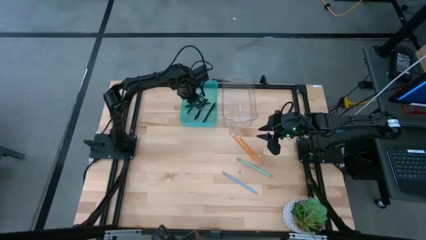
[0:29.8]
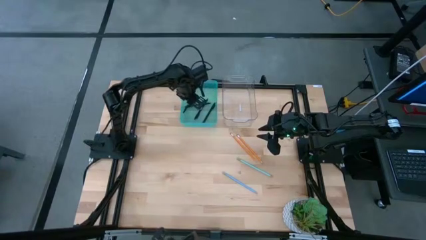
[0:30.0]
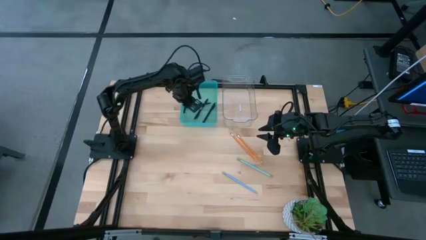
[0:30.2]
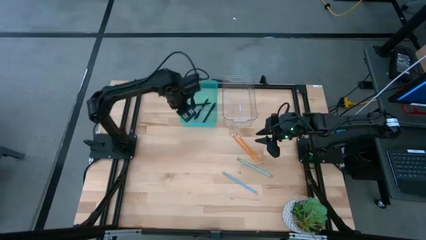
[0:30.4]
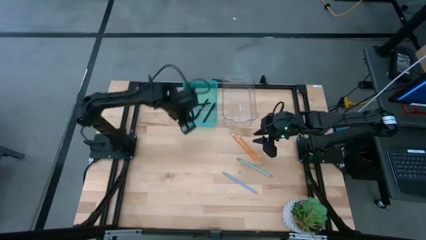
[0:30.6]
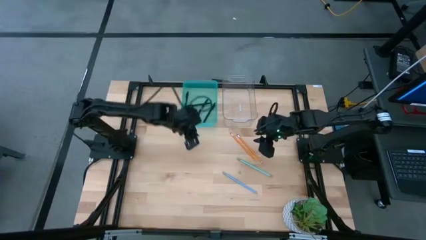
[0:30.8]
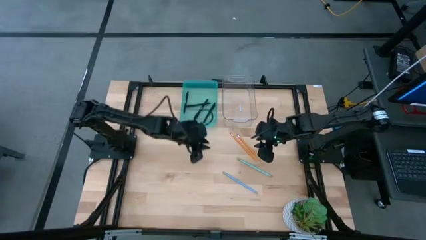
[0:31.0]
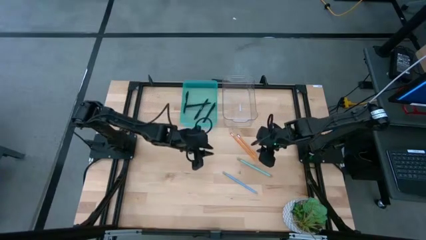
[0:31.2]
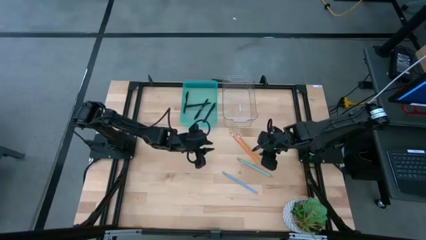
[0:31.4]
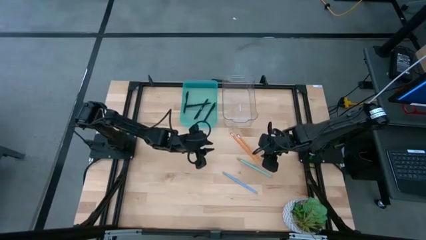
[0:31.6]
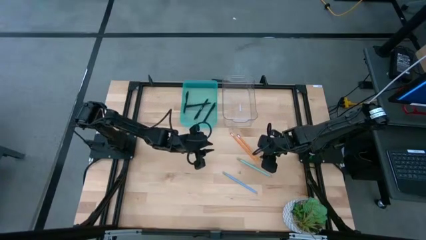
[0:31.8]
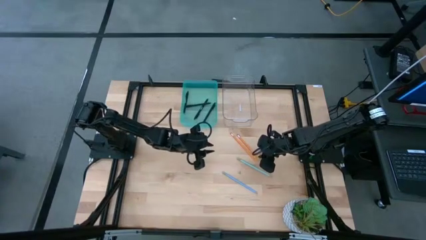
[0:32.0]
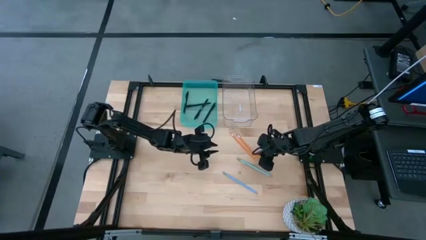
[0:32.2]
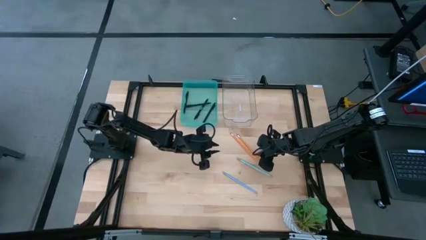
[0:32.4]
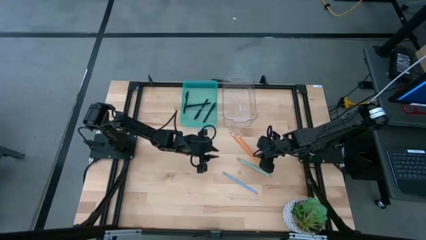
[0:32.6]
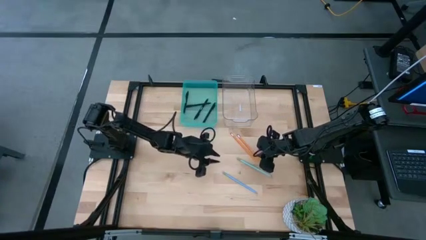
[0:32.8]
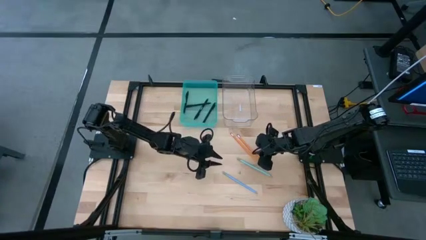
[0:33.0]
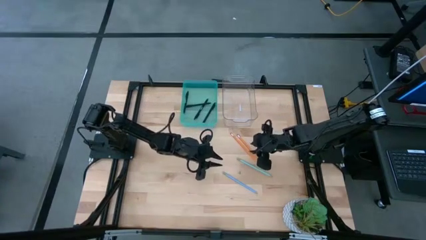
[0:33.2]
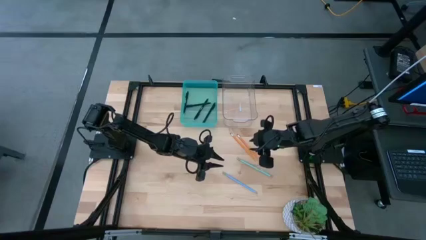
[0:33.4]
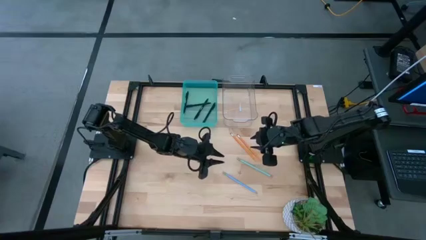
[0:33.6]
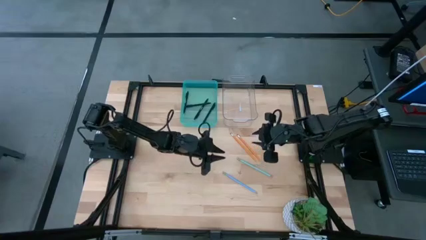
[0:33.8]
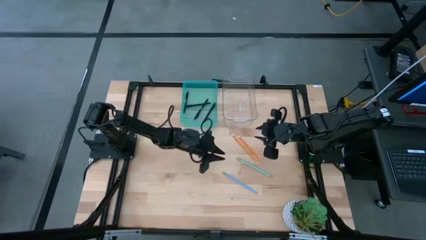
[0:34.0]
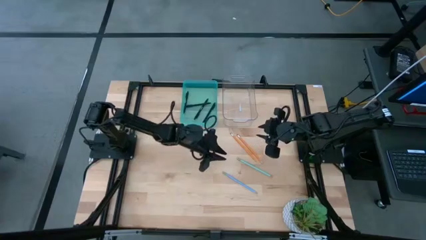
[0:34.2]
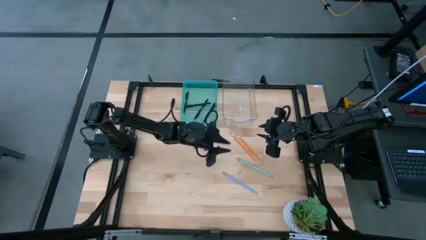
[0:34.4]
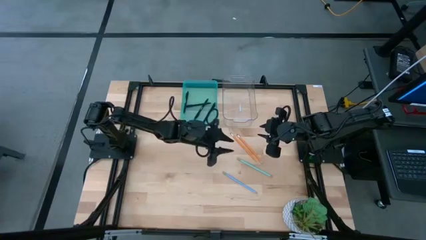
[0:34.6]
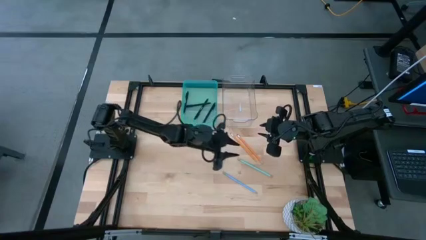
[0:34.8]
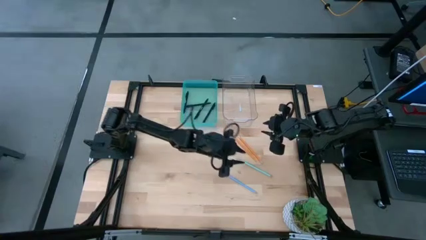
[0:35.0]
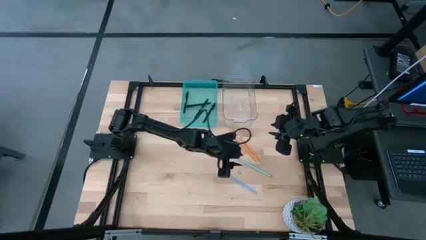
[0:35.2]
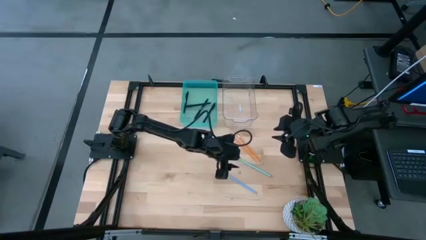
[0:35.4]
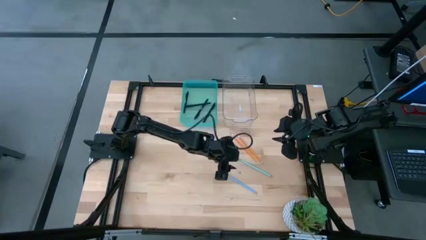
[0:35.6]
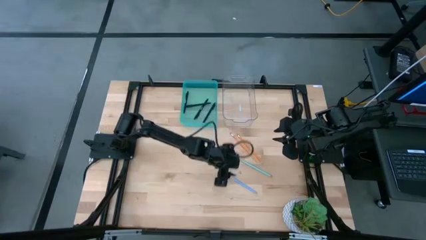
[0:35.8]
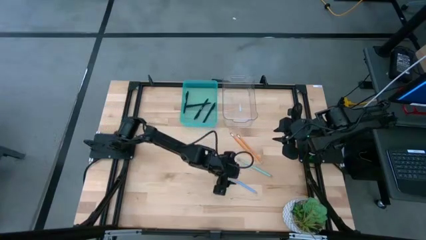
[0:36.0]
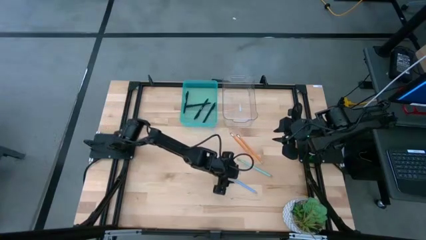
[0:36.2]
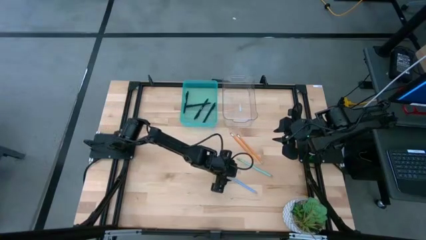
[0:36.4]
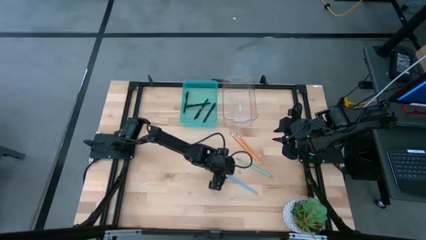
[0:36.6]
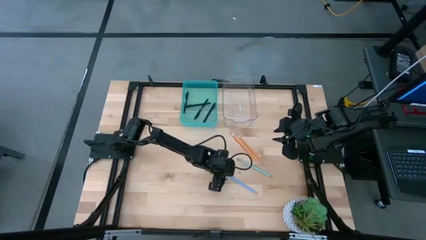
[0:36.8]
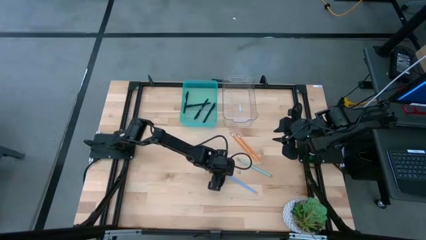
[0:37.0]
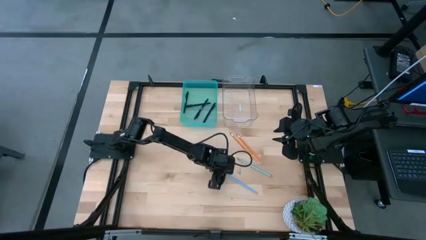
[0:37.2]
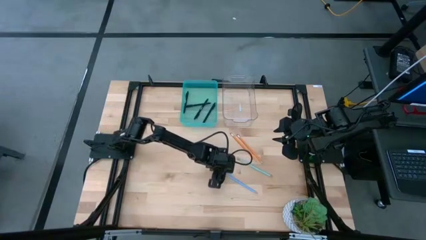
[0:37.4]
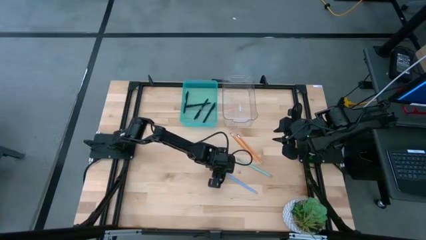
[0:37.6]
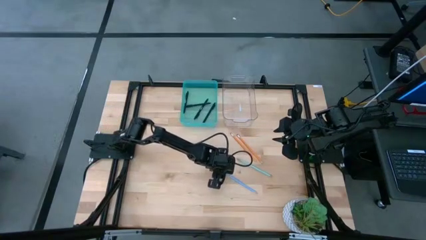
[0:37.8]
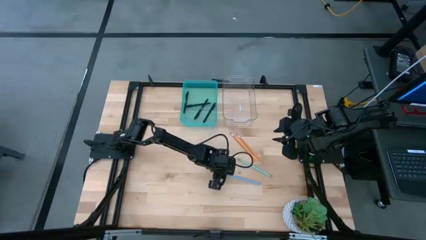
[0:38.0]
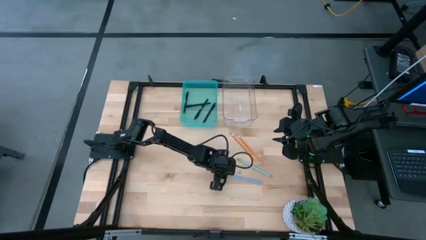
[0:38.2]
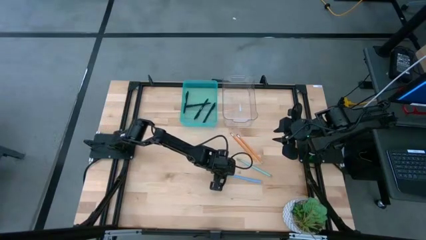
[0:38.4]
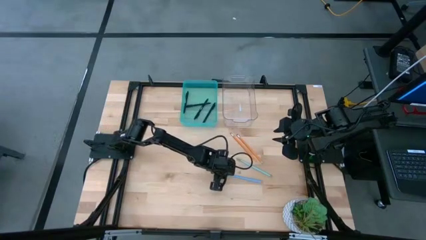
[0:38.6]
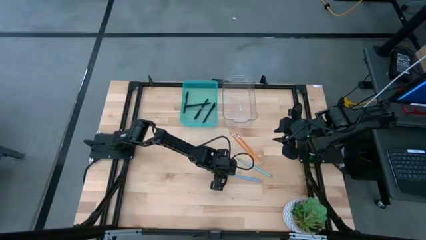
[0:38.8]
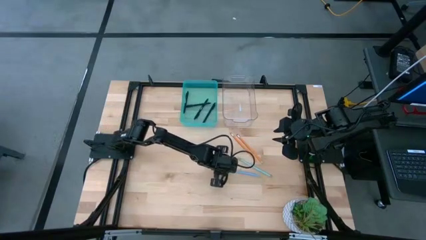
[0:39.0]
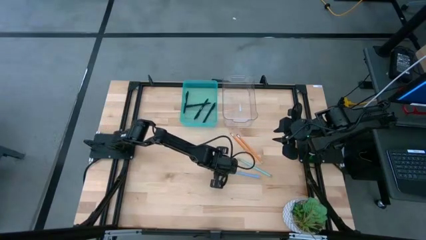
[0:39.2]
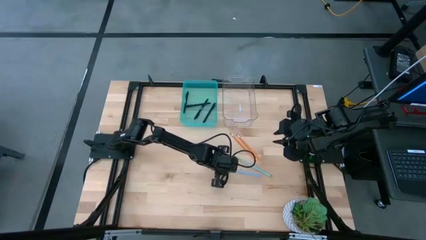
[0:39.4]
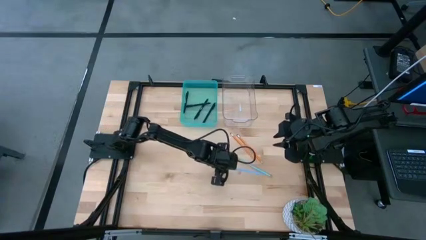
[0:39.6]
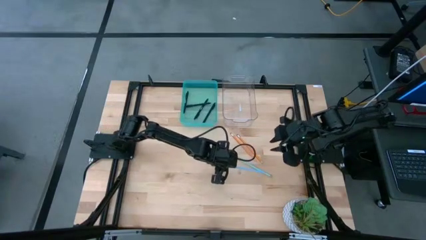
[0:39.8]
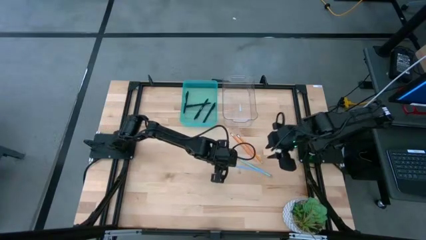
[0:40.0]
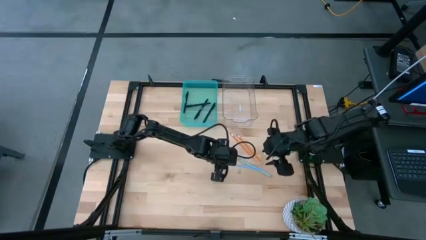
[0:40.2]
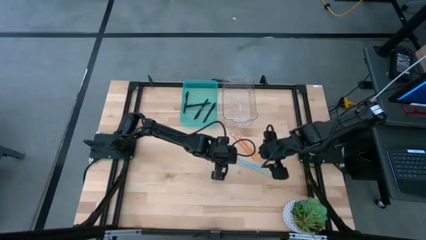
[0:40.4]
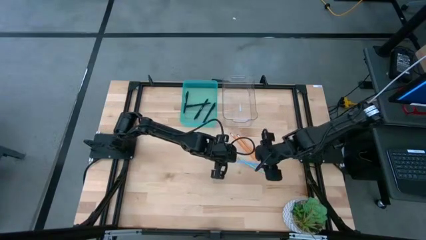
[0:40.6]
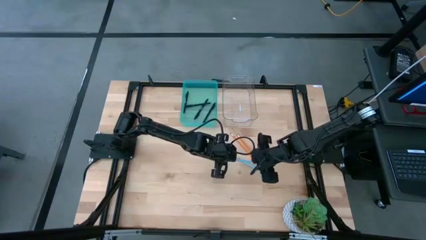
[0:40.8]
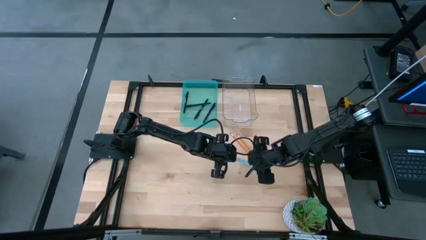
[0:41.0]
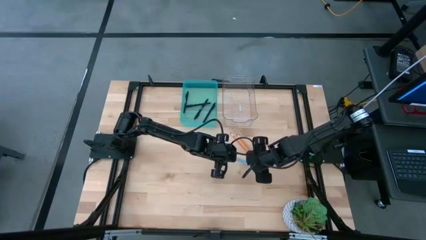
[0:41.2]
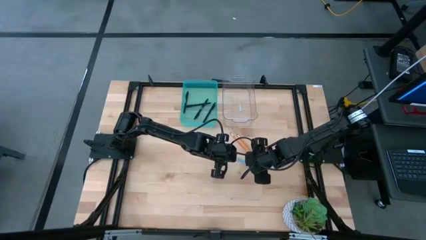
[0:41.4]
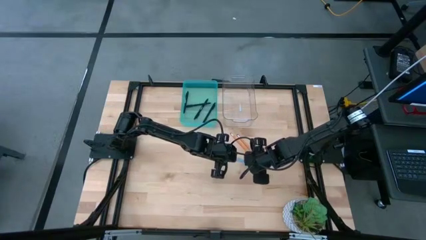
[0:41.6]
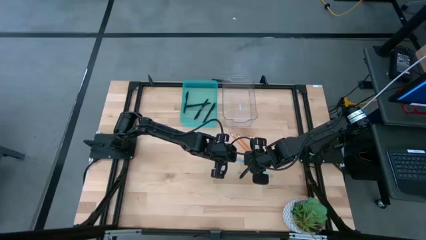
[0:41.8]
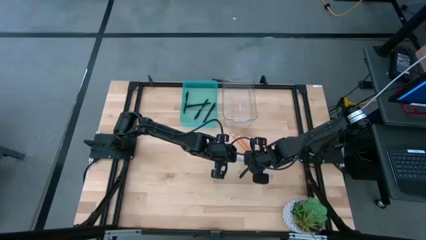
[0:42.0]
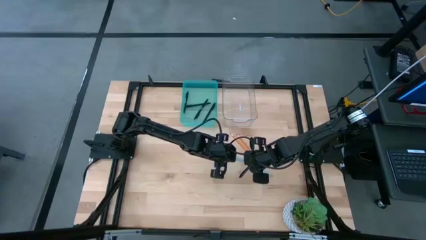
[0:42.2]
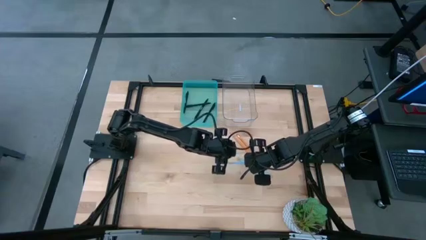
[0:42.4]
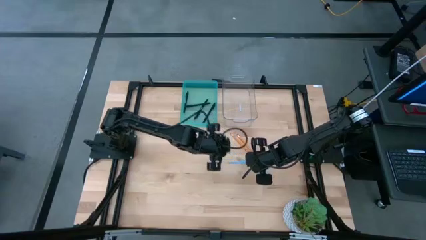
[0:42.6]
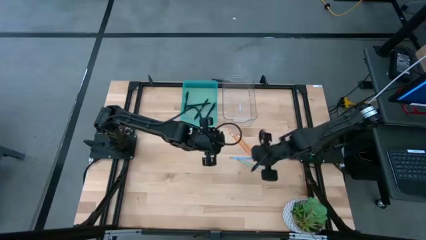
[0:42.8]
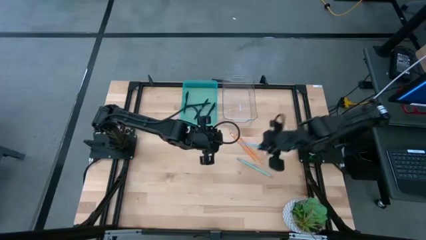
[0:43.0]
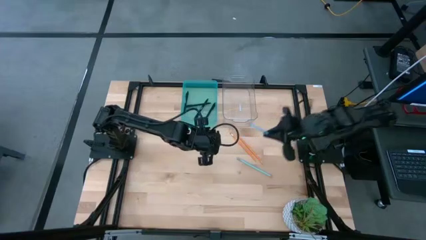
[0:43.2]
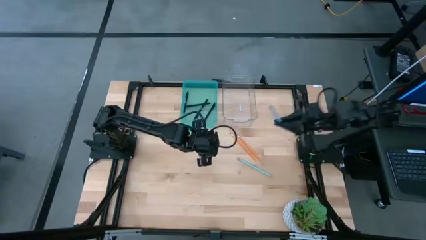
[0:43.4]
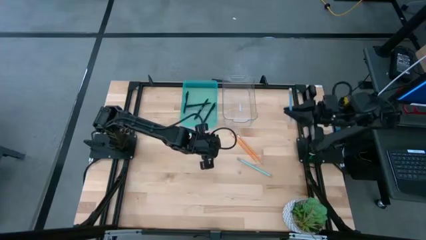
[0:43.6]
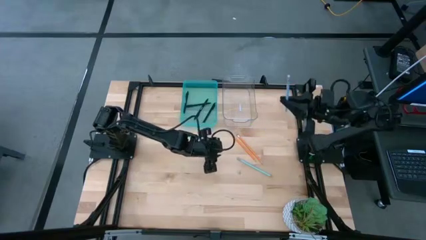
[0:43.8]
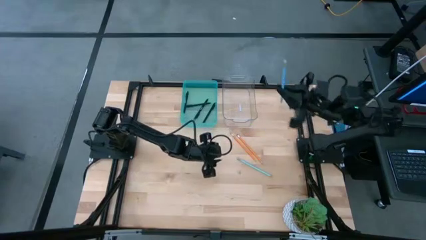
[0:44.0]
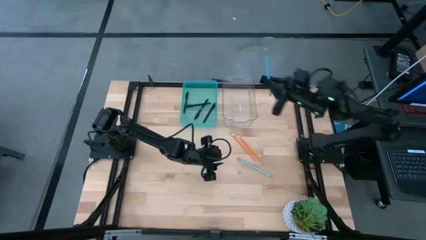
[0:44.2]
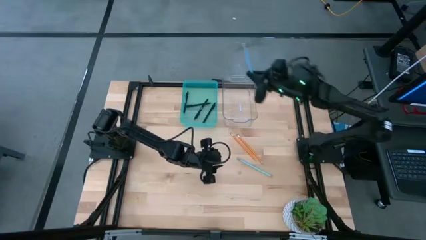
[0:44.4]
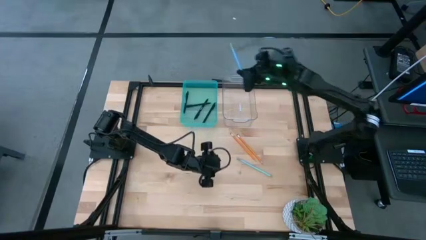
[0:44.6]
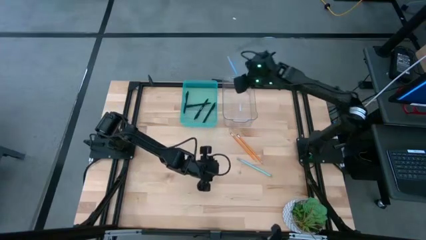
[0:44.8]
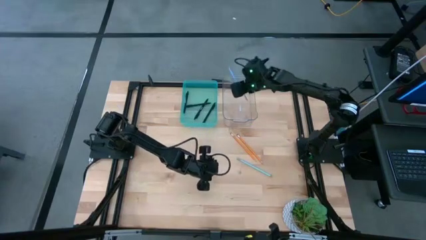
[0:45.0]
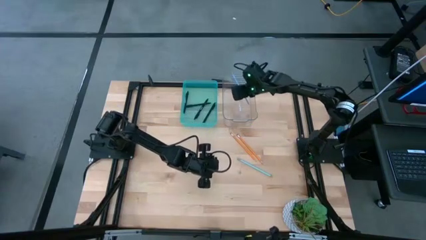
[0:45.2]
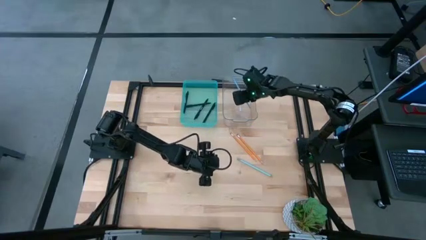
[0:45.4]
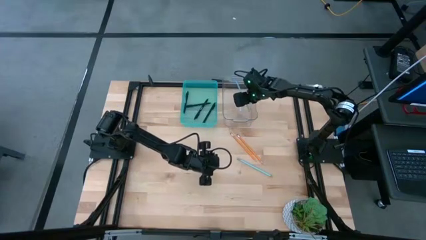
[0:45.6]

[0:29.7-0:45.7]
Task: Sort pens & pencils
Put the blue pencil into the transparent bin
